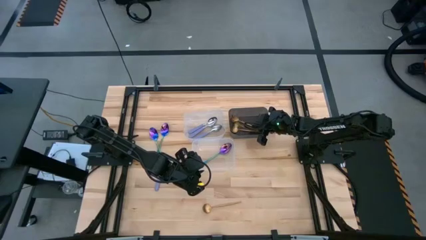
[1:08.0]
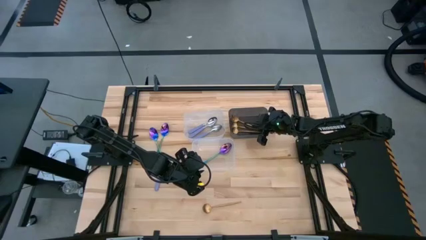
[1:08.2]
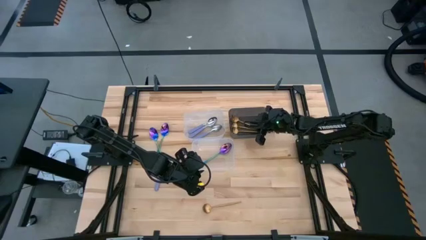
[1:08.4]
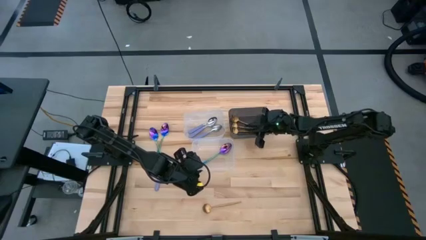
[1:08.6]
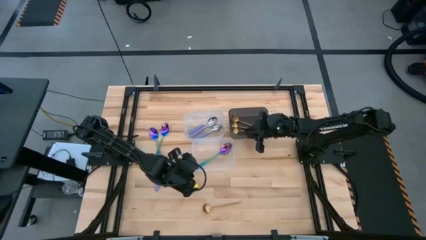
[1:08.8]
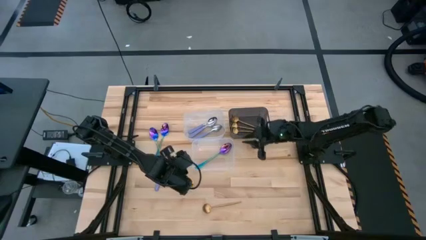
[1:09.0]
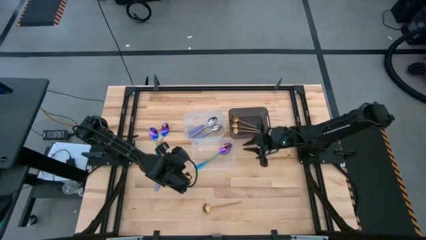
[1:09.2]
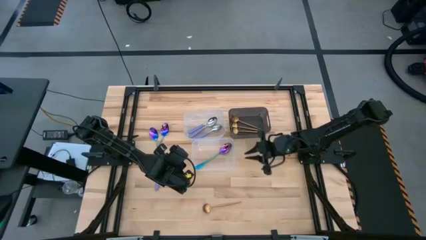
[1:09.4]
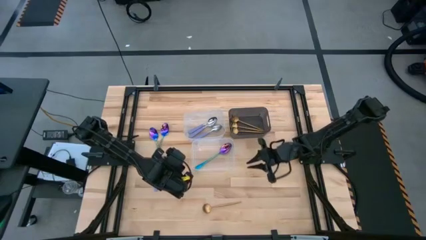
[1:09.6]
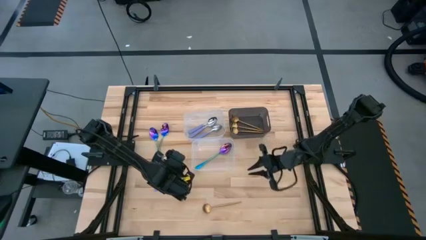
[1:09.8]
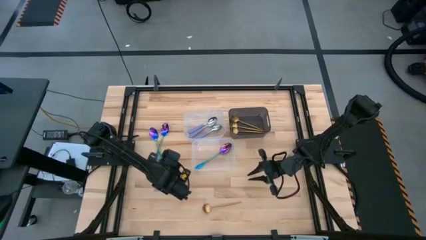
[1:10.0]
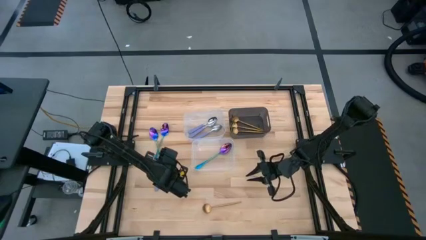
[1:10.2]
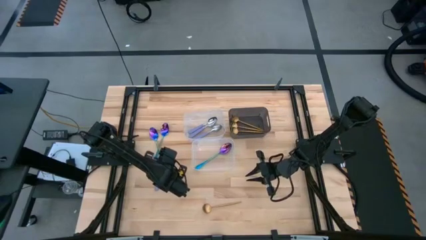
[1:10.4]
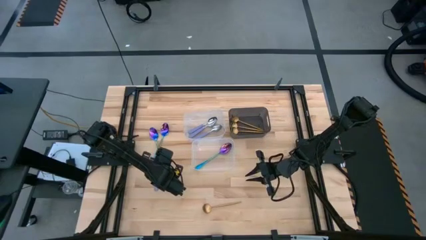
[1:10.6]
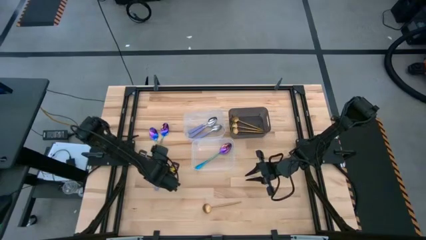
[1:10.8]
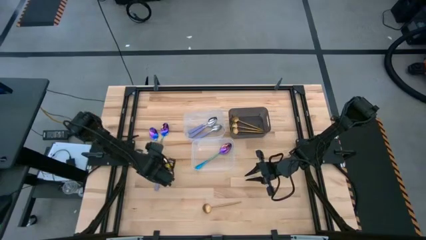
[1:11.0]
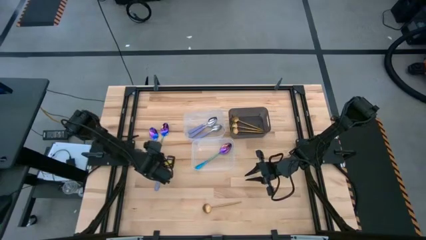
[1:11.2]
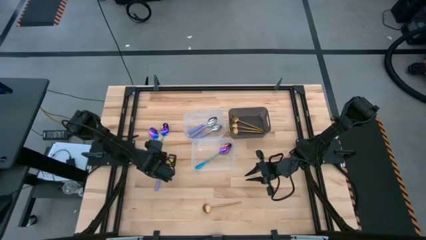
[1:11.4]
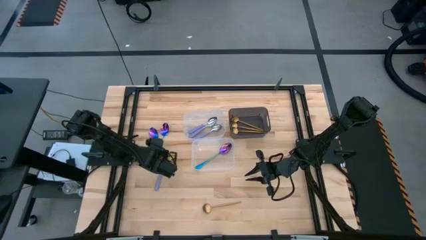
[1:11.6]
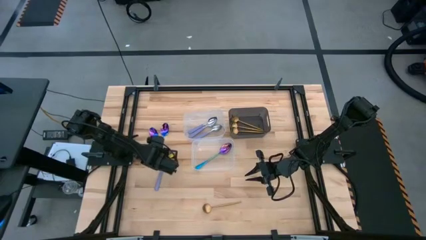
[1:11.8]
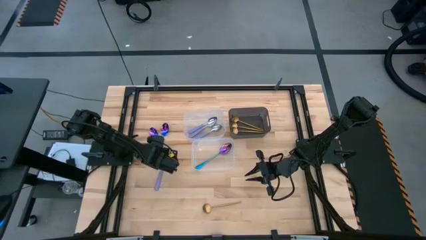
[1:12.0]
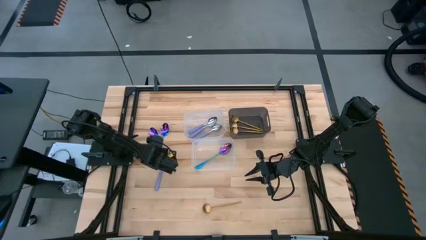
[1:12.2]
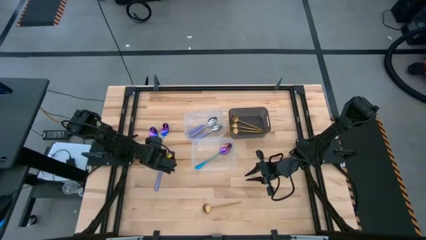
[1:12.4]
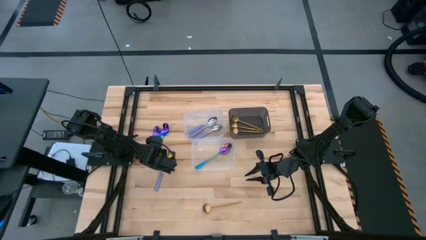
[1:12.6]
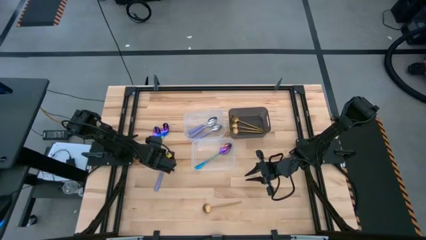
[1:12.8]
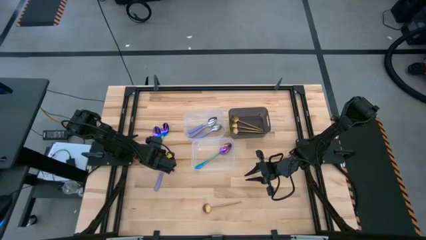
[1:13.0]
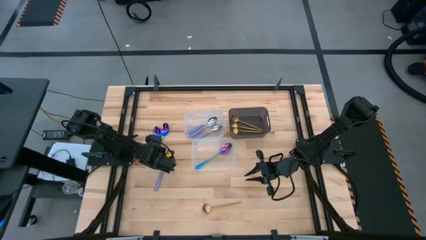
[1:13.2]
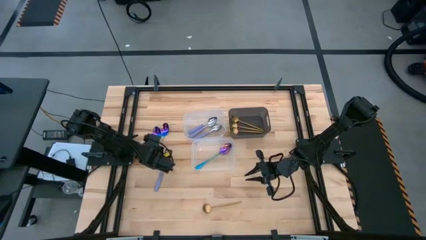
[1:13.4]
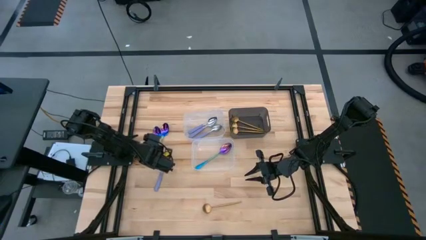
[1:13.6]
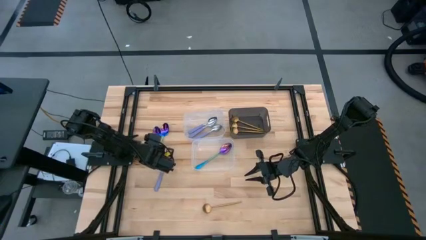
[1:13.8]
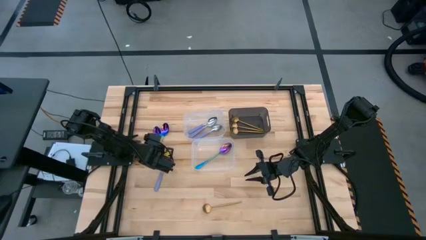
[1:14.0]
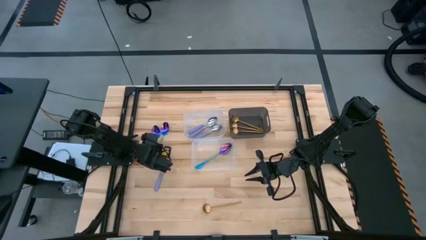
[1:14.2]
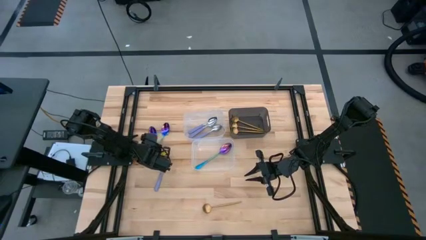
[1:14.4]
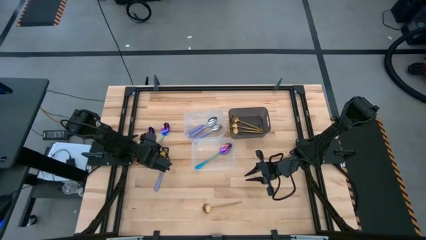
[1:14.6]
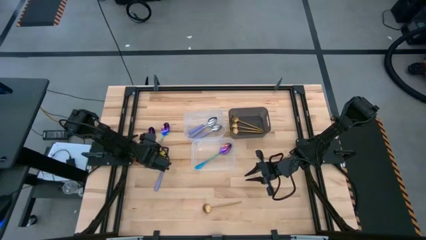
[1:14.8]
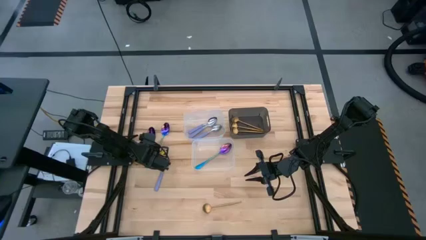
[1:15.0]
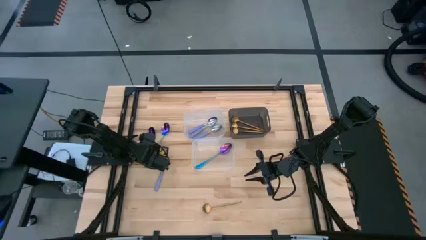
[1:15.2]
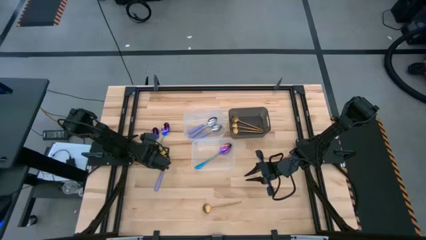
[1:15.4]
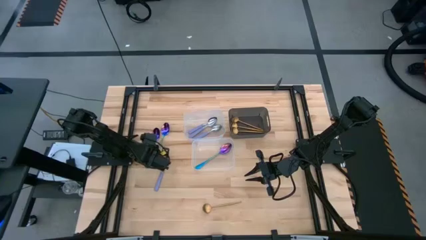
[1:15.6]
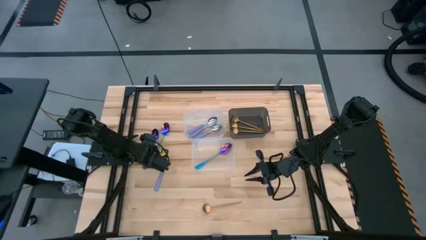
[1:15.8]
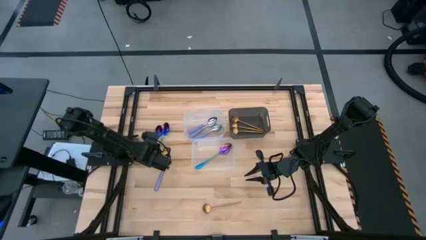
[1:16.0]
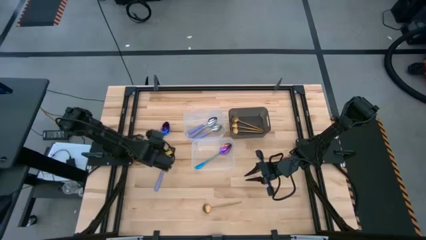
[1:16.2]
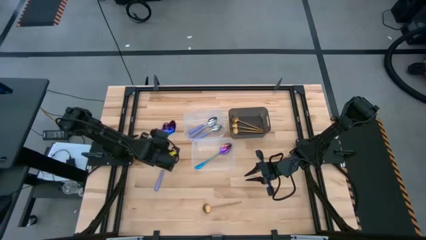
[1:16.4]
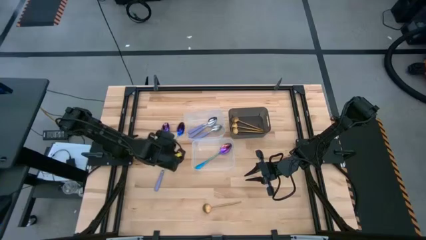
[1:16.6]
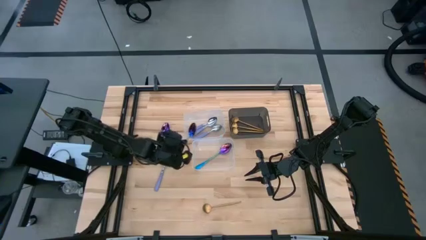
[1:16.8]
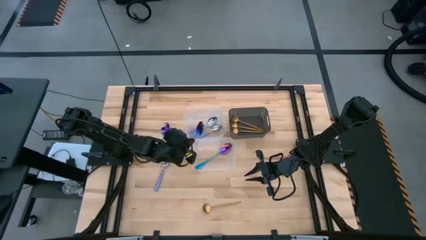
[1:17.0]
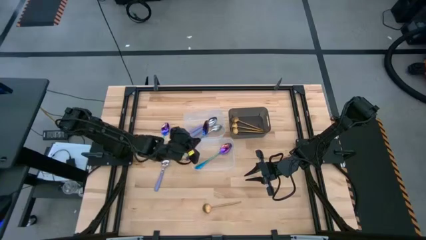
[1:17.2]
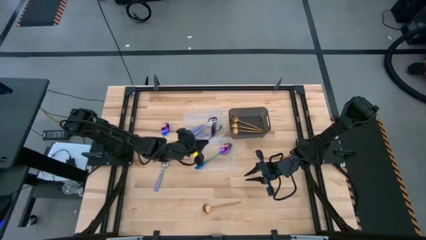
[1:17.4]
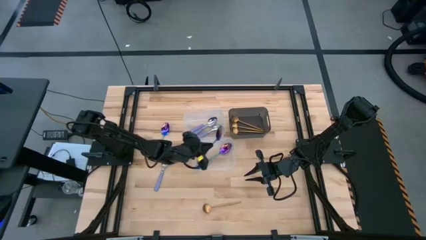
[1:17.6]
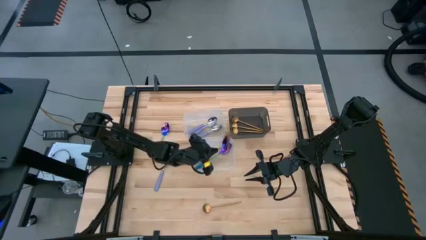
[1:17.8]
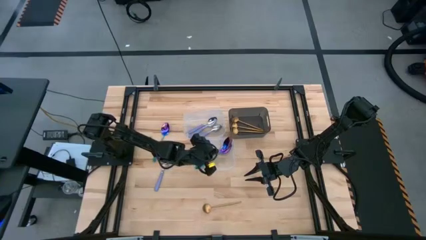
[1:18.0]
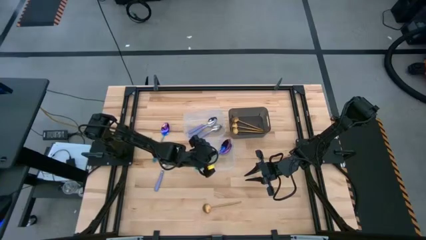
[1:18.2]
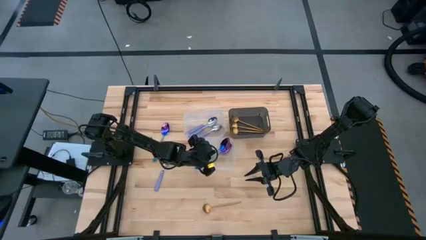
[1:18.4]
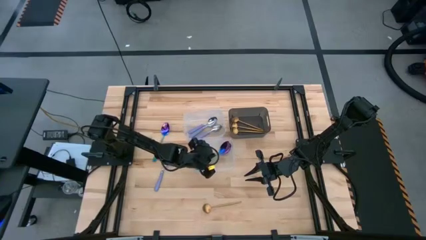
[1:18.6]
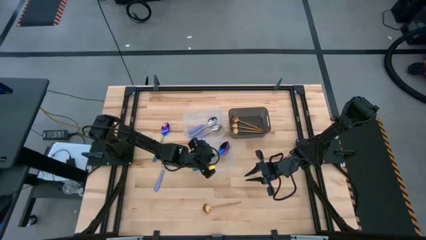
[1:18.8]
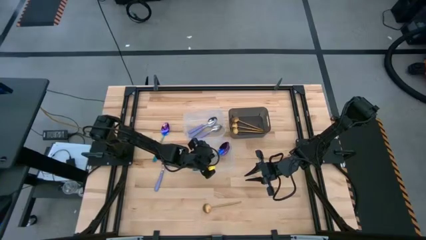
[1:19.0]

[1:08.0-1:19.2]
Task: Sort silverware by color (type)
Put the purple spoon into the bottom transparent bin

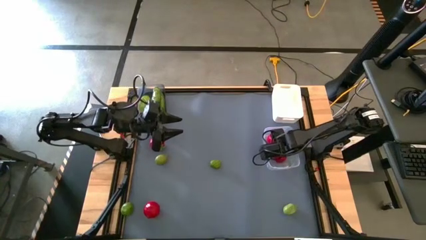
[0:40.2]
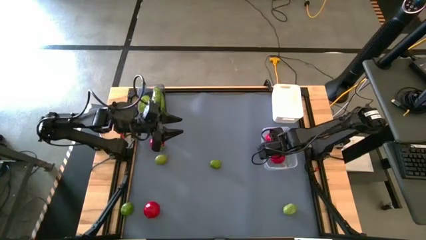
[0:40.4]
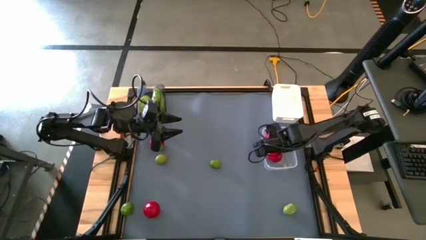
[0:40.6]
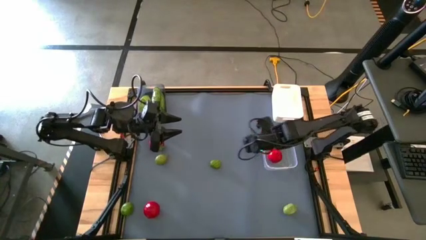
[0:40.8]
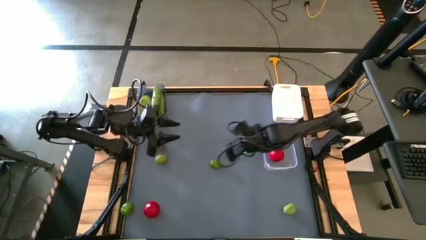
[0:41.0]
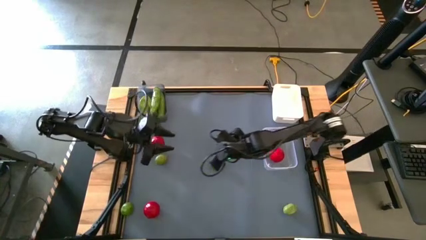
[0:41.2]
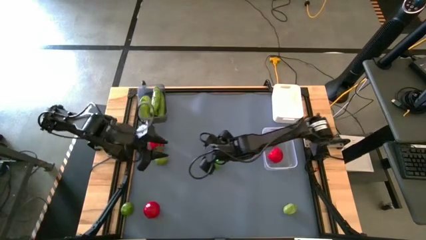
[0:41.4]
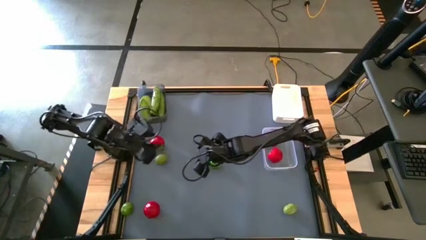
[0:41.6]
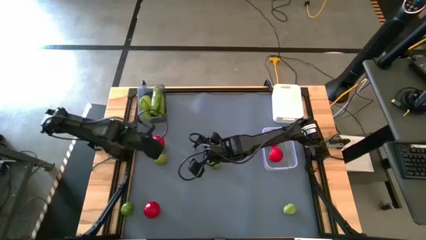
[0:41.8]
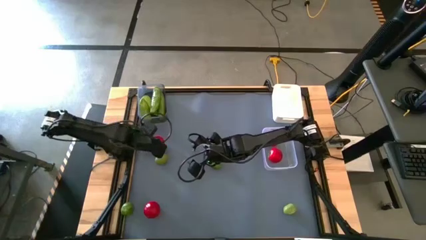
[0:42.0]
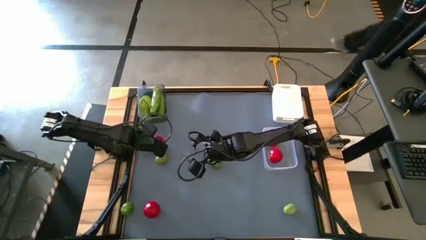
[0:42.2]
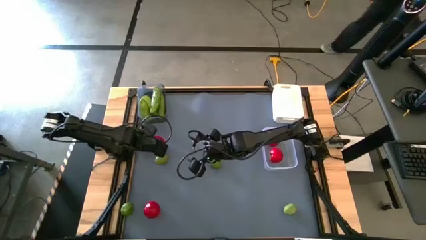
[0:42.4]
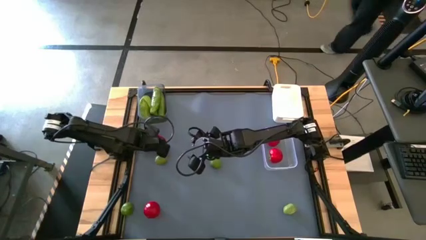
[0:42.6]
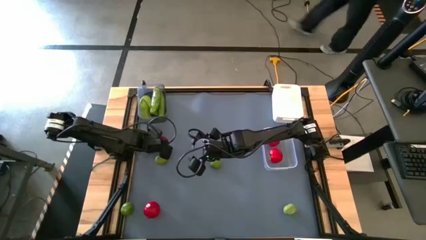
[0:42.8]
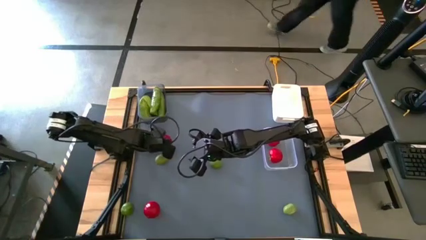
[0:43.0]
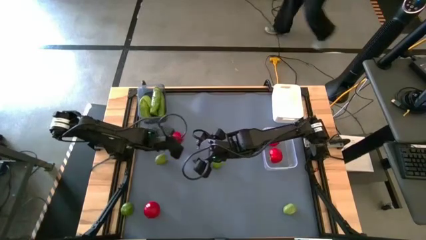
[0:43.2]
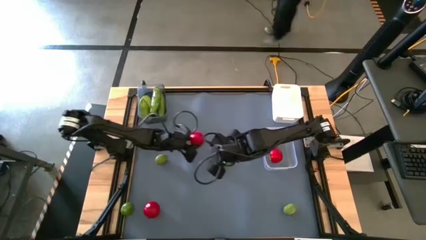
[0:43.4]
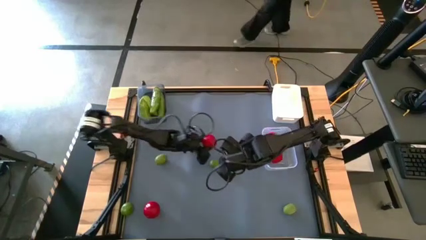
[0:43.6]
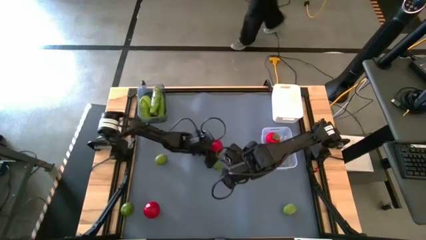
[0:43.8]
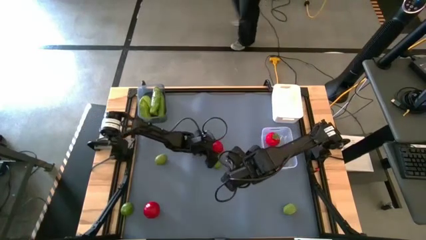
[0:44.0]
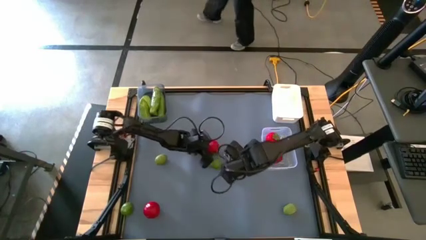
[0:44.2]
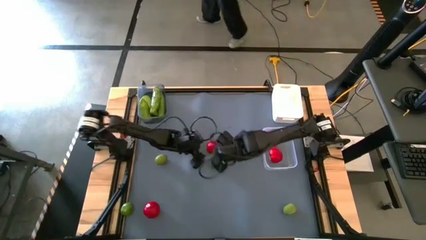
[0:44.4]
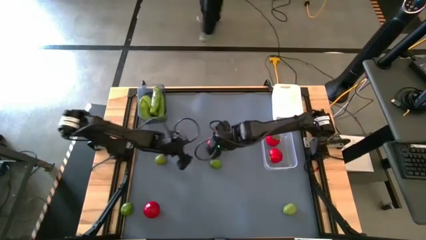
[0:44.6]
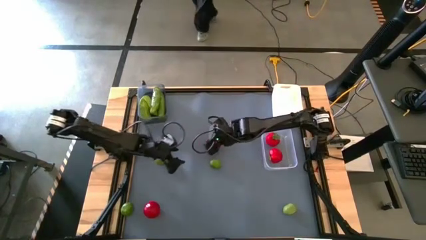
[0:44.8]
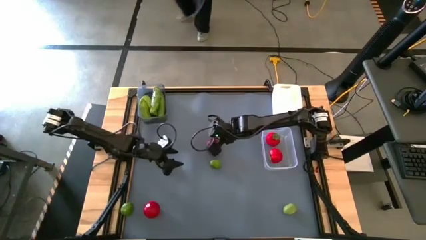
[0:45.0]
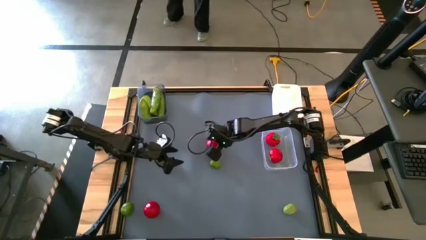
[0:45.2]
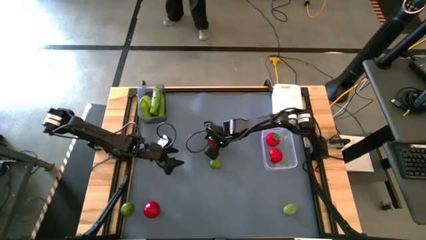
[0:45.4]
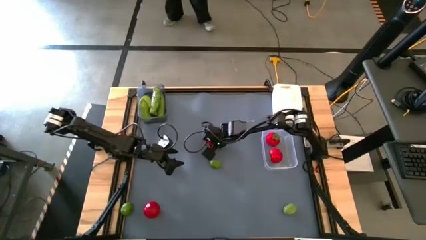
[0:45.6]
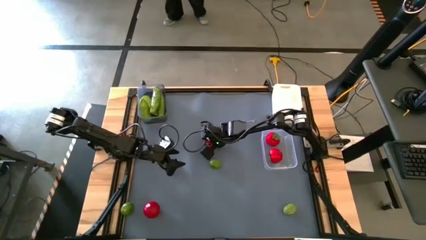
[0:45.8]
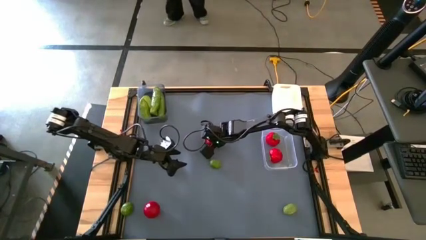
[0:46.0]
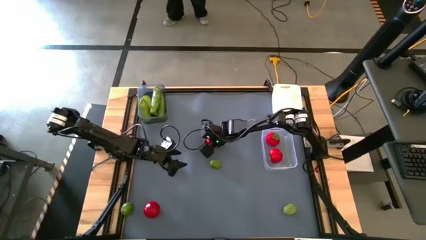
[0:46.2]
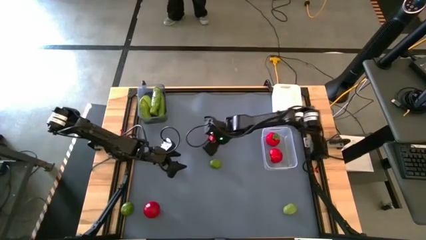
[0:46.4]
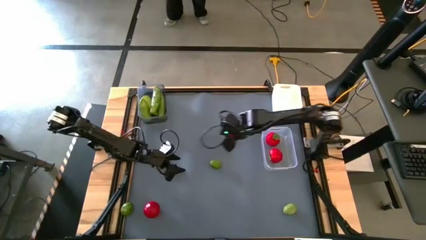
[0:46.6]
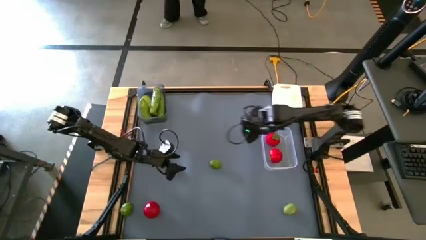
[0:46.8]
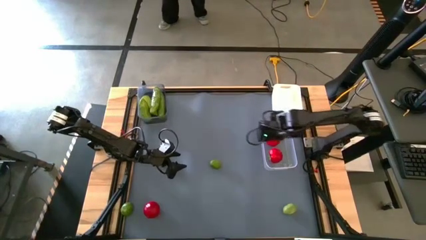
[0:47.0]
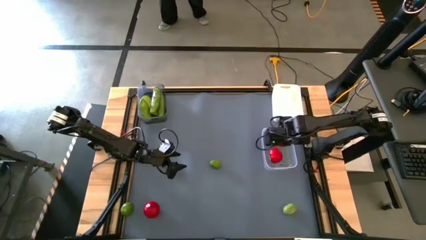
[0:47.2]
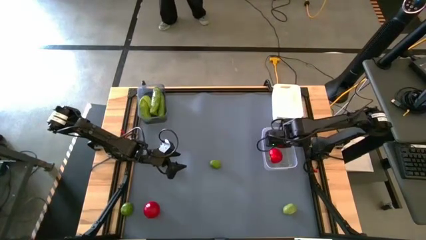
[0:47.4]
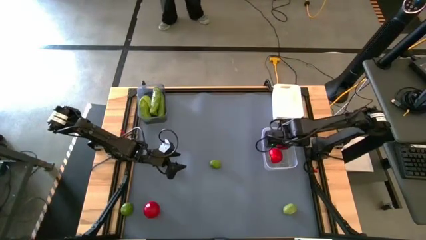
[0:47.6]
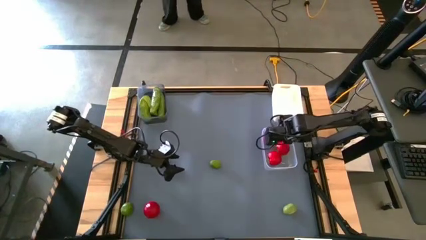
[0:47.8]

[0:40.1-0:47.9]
Task: Sort produce into baskets
Put the tomato into the transparent bin
